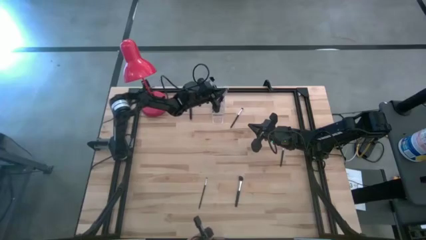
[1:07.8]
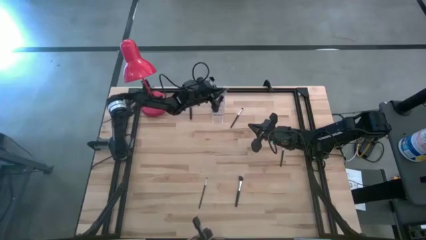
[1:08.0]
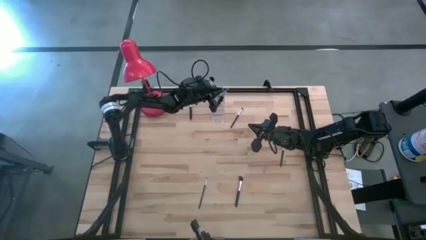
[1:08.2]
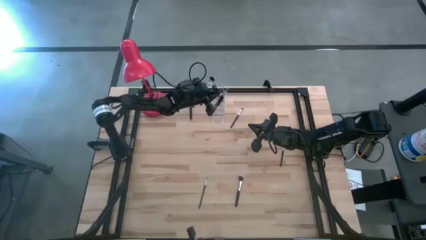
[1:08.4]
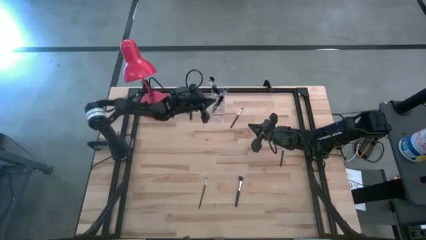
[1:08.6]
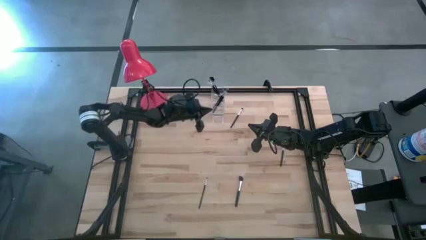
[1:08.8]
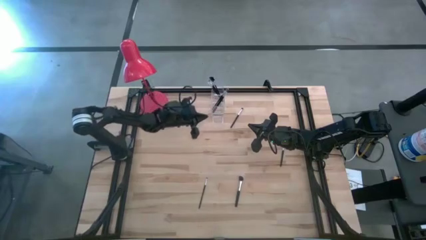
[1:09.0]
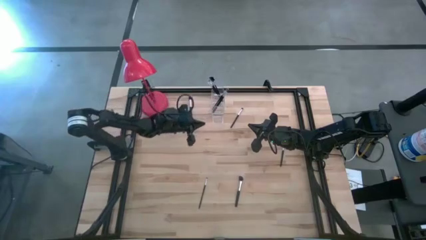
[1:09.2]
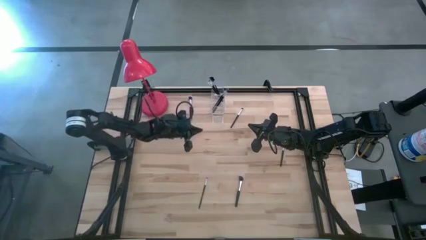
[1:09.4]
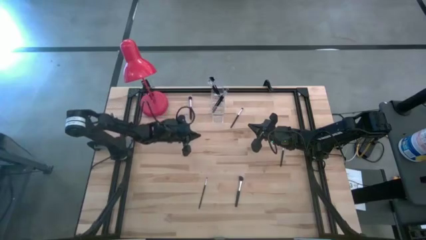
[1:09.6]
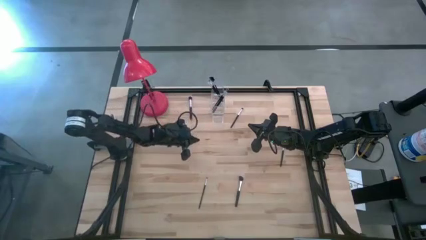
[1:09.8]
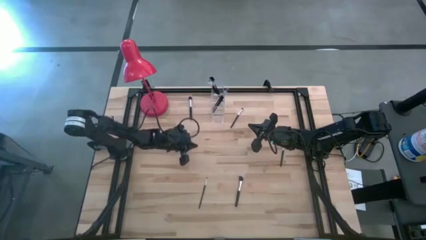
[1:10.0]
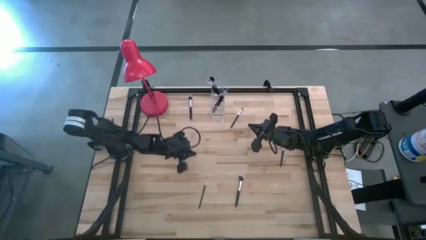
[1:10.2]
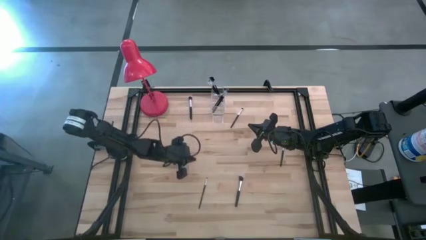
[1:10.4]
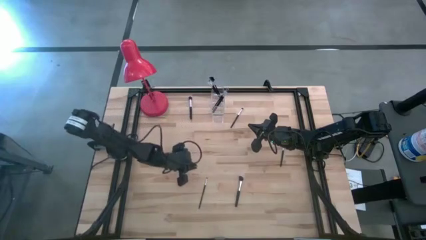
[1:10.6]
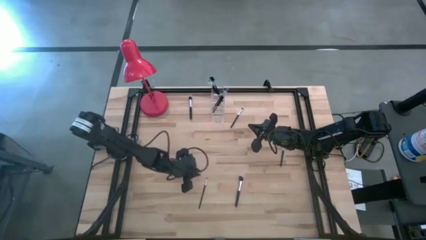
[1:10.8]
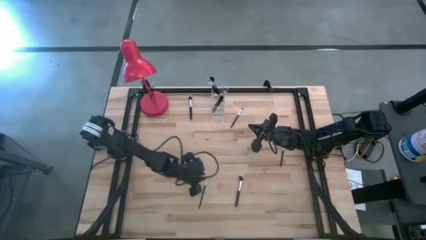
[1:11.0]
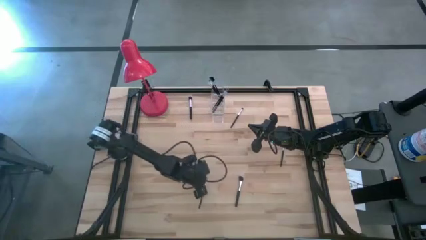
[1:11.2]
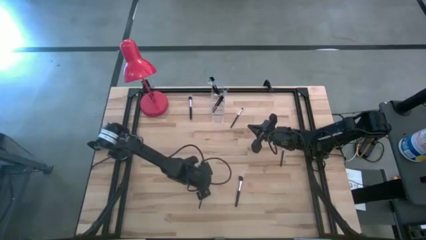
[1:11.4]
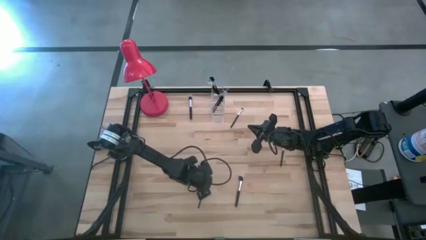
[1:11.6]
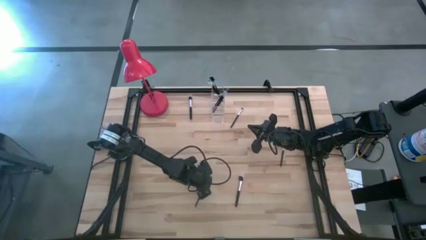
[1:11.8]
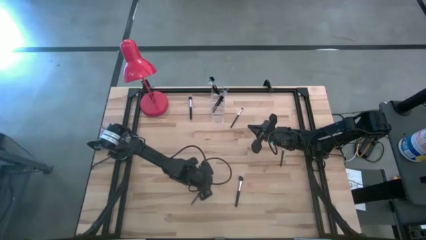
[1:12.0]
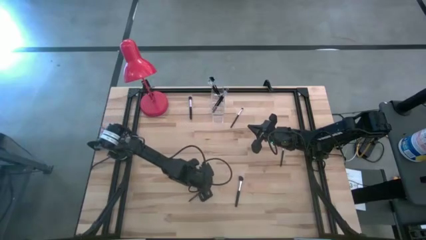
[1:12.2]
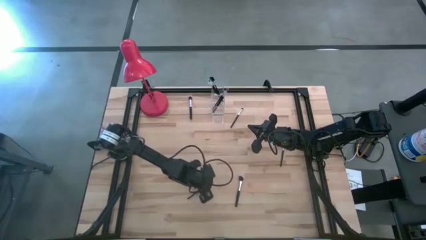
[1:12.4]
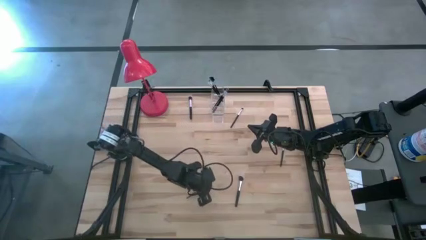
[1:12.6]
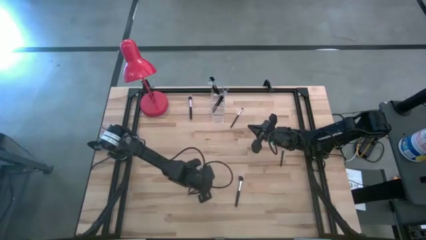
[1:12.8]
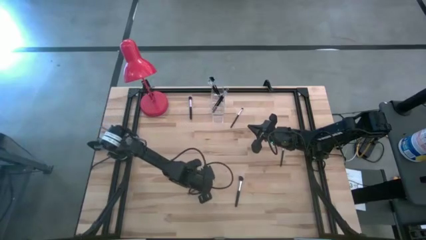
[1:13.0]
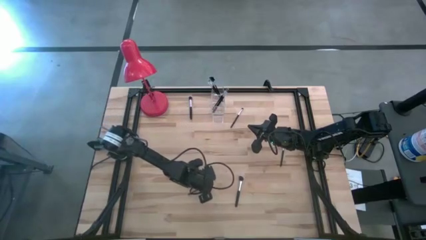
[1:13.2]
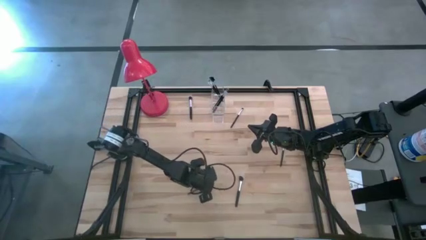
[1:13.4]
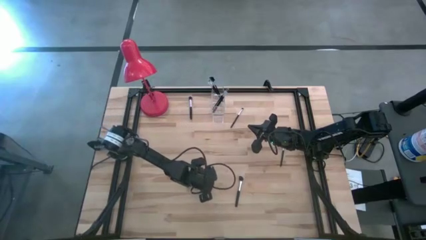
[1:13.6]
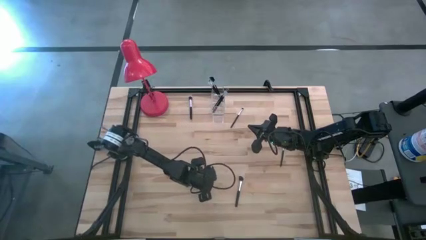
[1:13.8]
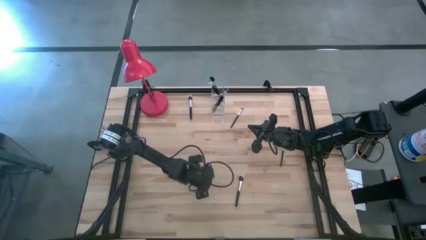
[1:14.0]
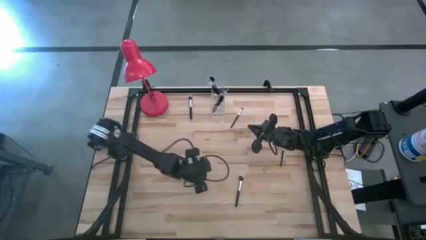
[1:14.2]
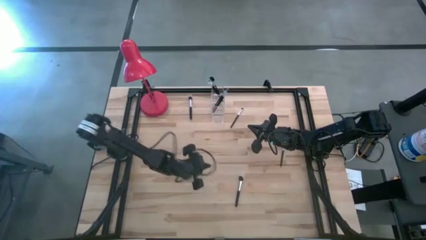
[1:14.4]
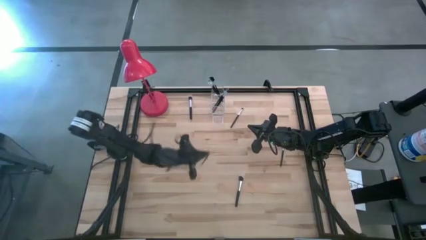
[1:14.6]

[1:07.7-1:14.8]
Task: Put items in baskets/containers
Put the black eyeshadow brush into the transparent organizer

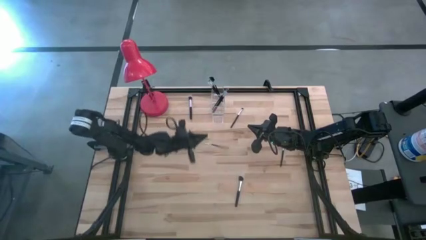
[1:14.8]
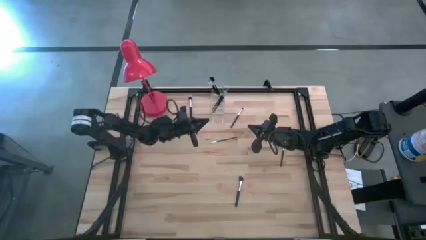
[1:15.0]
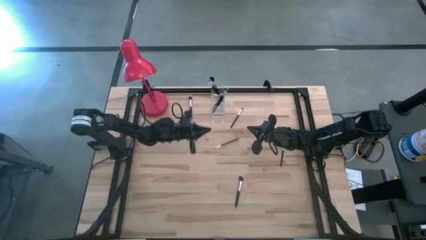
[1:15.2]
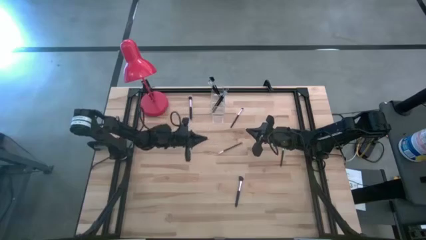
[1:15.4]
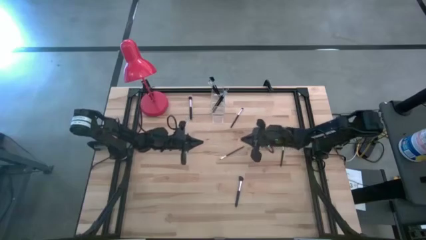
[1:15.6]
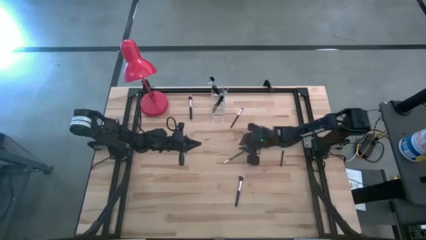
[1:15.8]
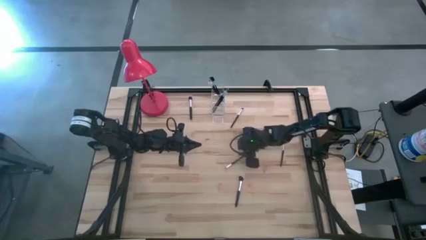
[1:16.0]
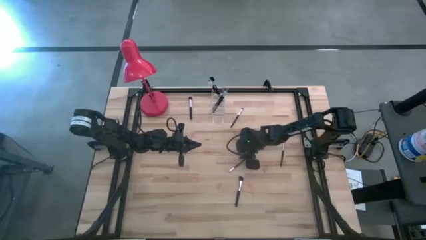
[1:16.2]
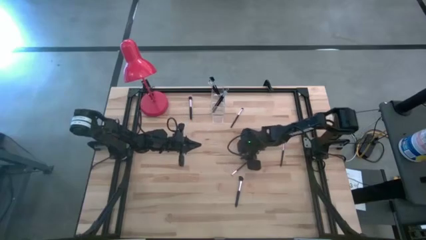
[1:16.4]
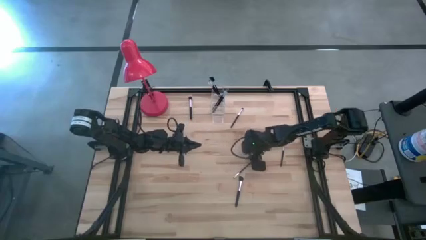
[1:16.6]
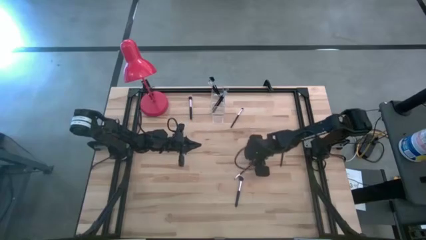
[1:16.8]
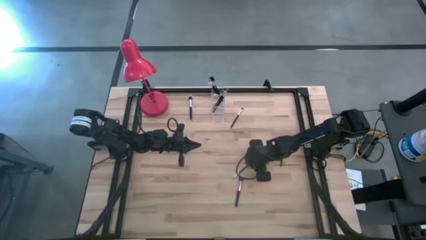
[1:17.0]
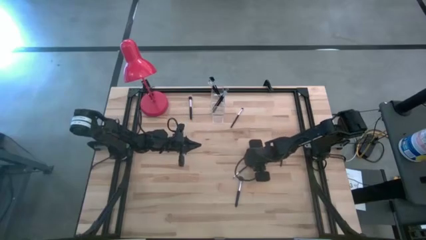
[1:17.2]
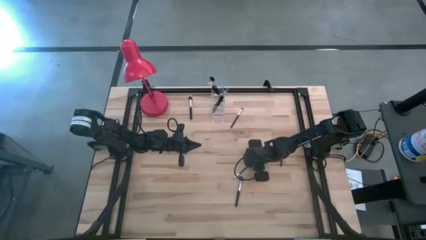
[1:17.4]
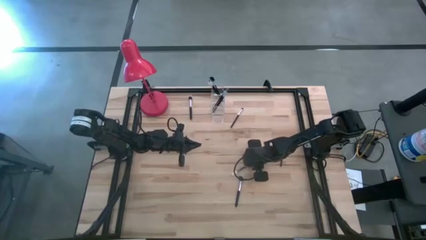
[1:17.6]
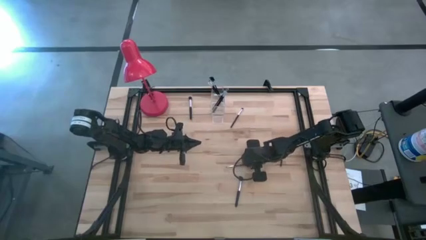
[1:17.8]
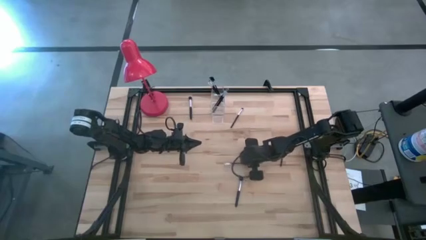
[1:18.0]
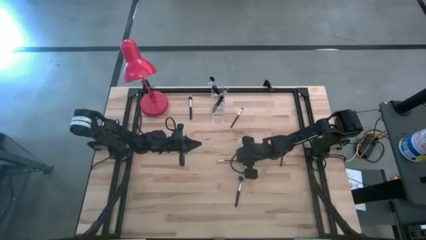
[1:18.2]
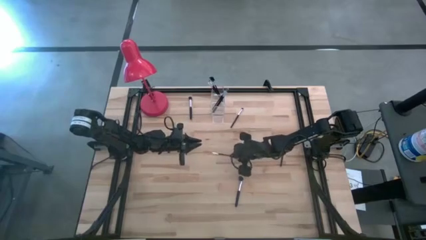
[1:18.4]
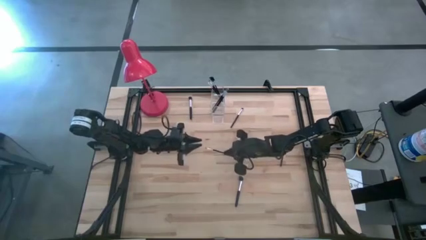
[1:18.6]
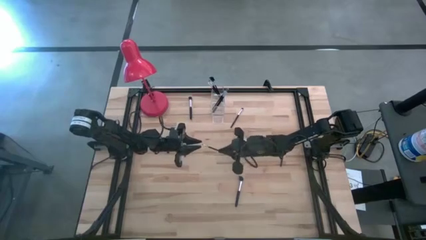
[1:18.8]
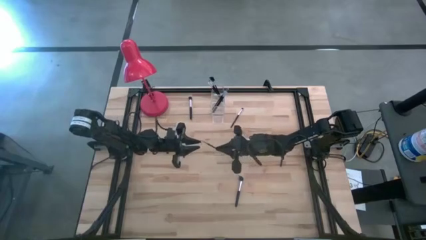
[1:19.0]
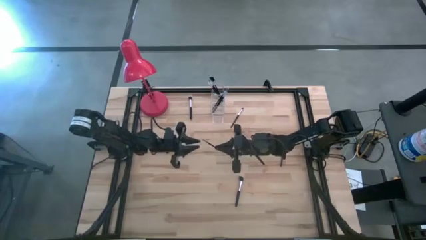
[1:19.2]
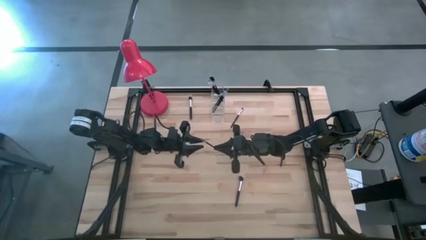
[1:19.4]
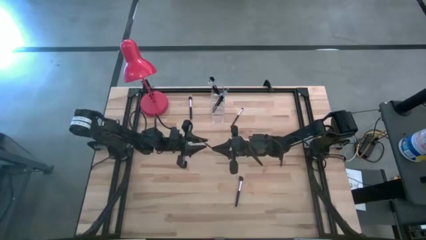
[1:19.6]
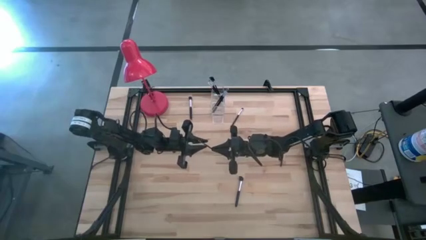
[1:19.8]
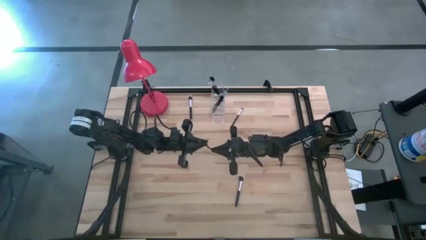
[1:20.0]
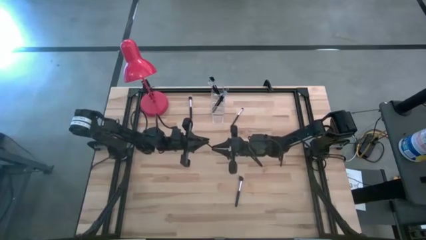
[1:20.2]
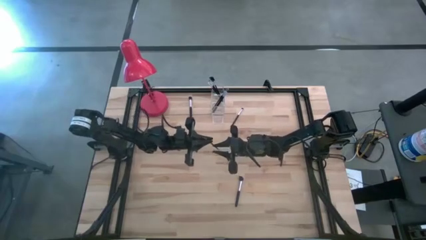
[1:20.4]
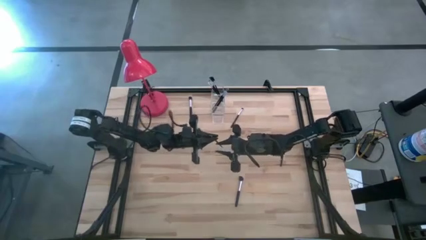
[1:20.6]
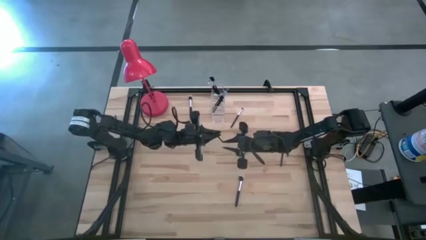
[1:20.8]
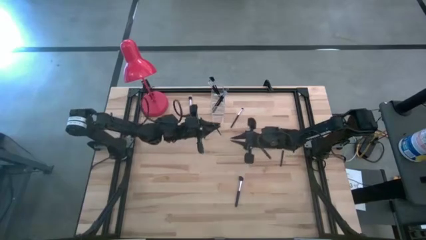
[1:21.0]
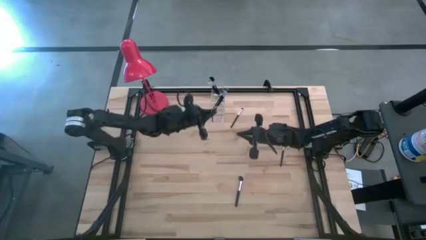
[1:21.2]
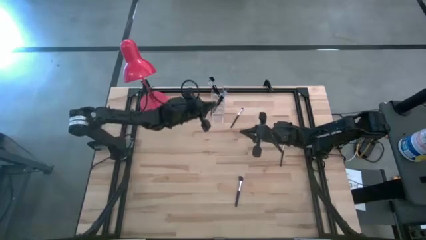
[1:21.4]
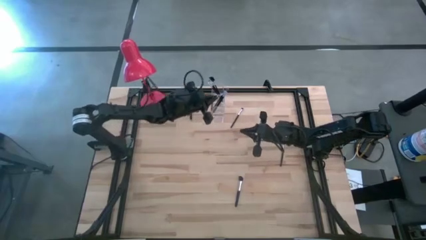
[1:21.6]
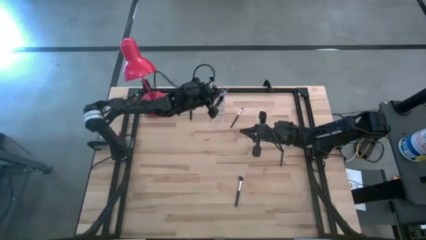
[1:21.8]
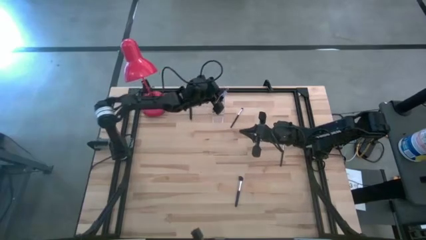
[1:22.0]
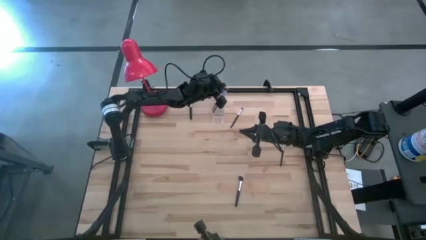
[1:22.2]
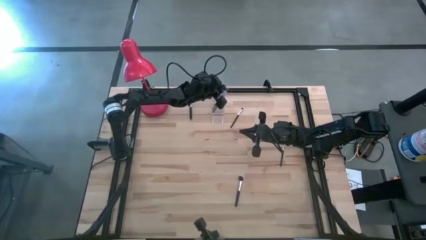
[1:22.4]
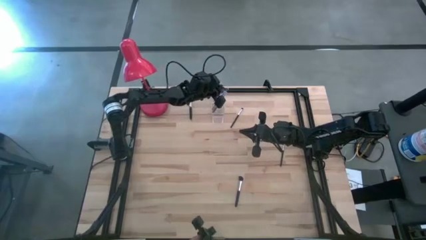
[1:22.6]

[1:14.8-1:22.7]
Put the black eyeshadow brush into the transparent organizer

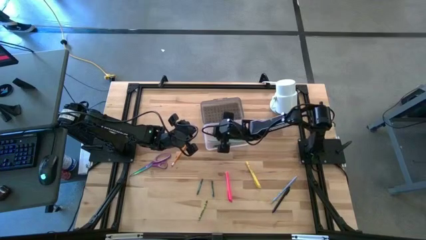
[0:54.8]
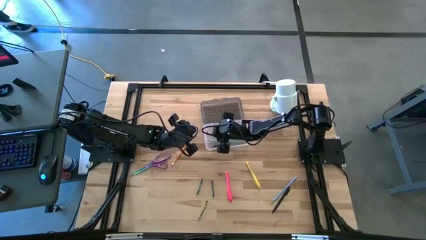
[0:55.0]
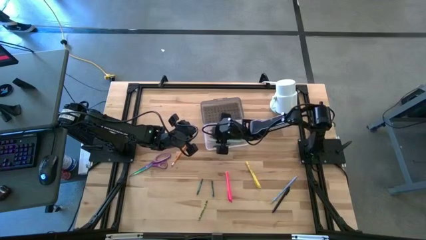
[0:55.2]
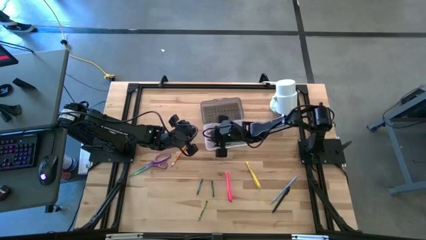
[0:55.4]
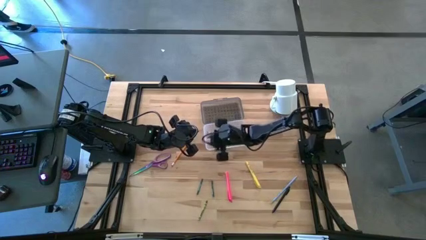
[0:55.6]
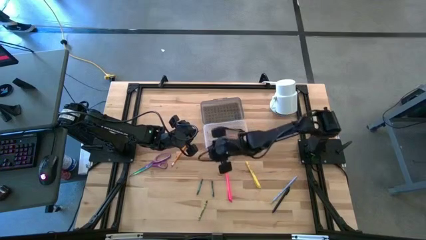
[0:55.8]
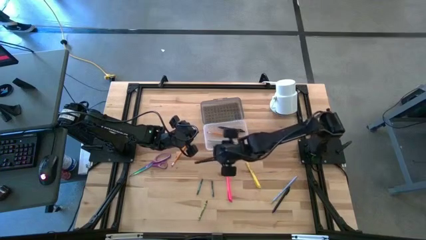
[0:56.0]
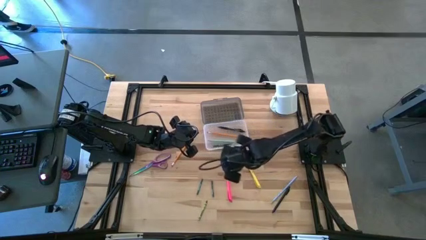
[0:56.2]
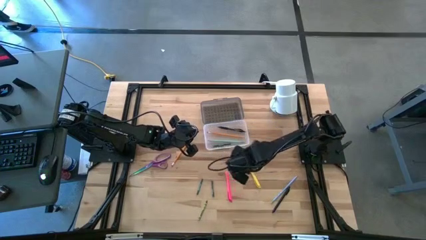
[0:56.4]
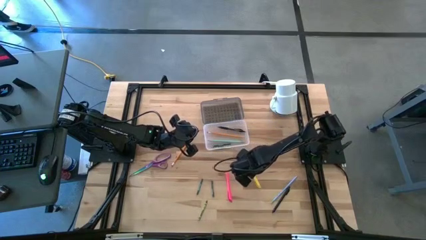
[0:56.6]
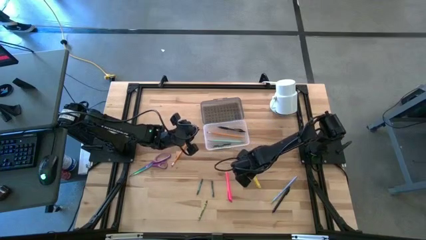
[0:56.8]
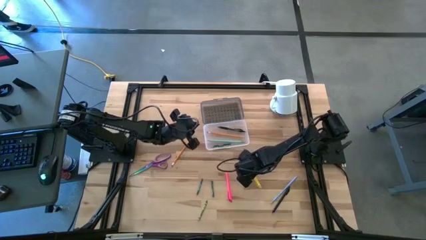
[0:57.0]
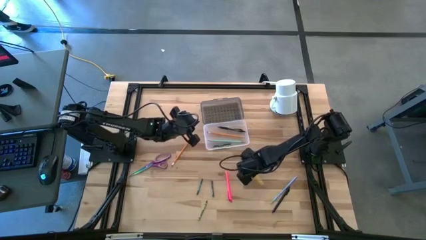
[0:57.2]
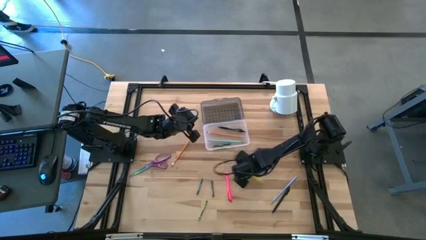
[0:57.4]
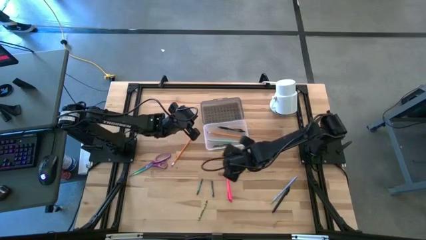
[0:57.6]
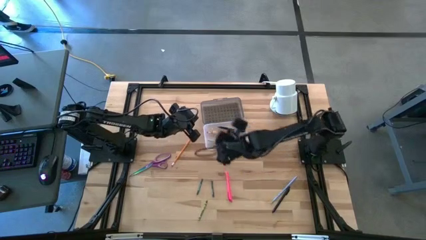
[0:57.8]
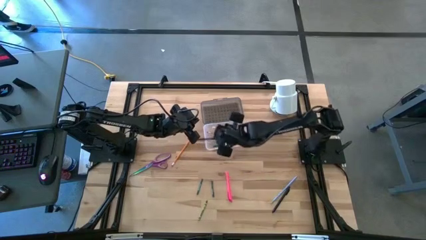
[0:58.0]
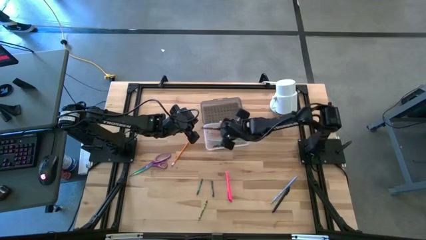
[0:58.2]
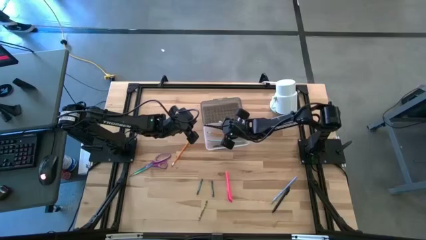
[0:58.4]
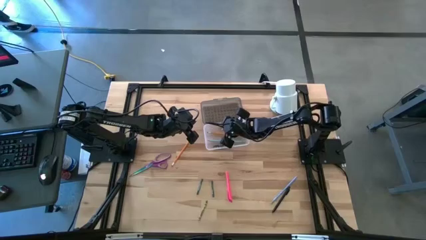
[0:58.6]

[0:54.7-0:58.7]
Task: Pick & place school supplies into a supply box
Put the yellow pen into the gray supply box
